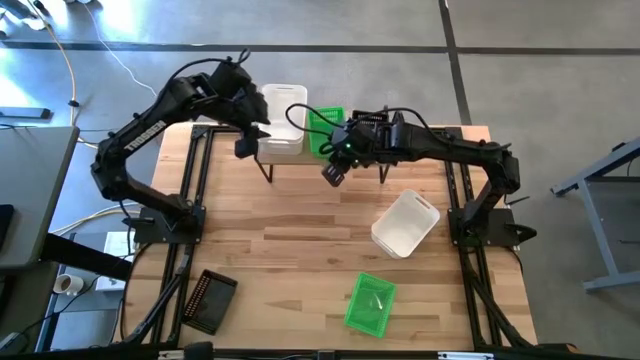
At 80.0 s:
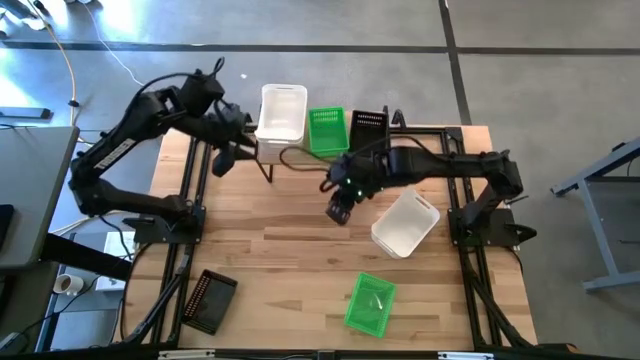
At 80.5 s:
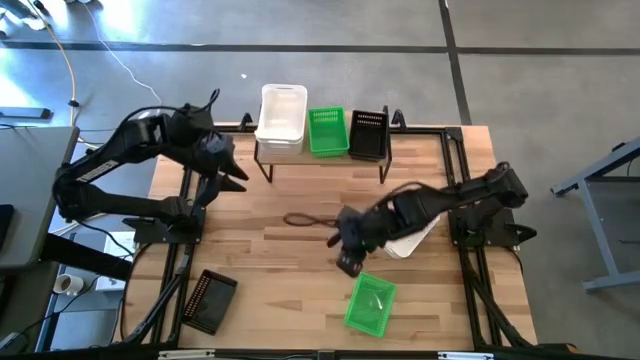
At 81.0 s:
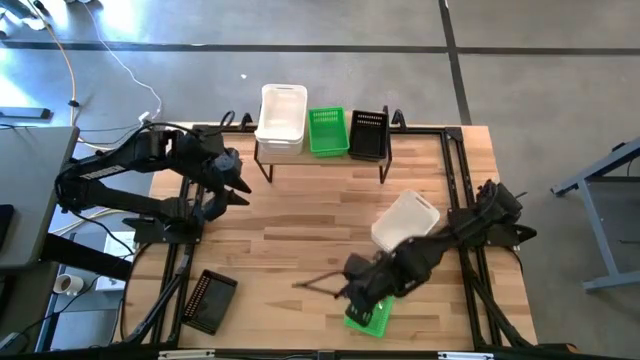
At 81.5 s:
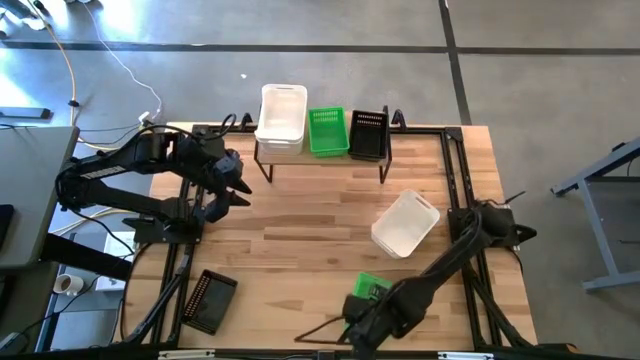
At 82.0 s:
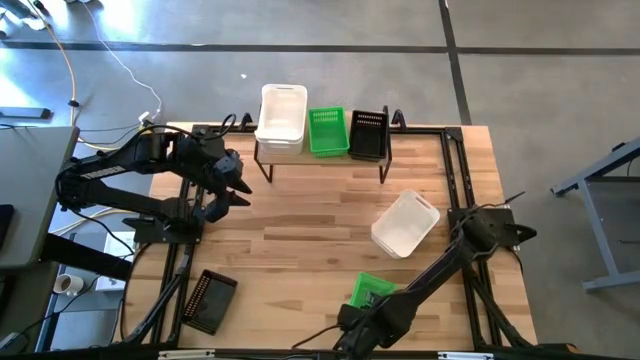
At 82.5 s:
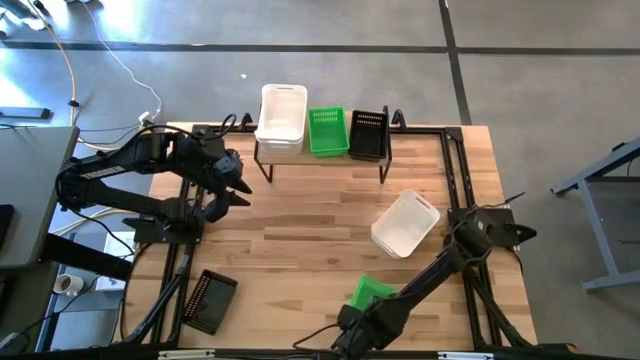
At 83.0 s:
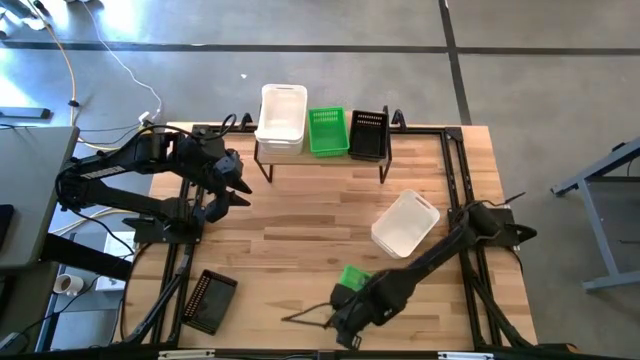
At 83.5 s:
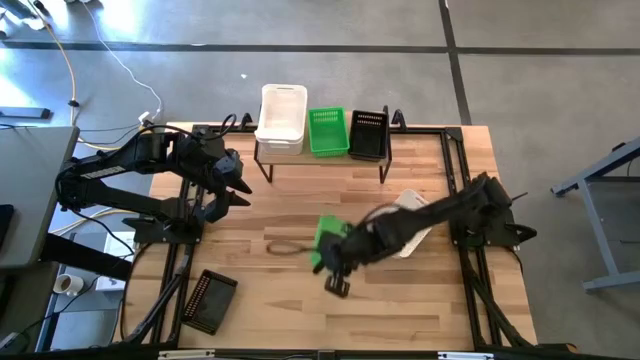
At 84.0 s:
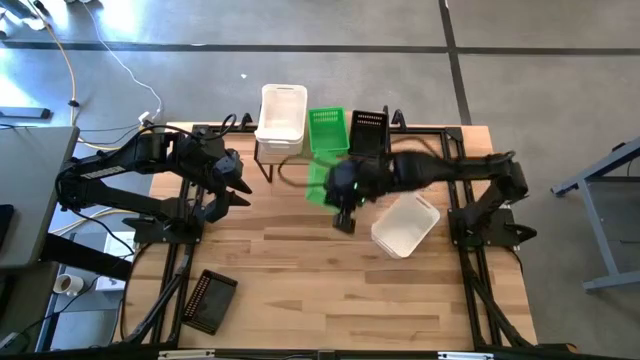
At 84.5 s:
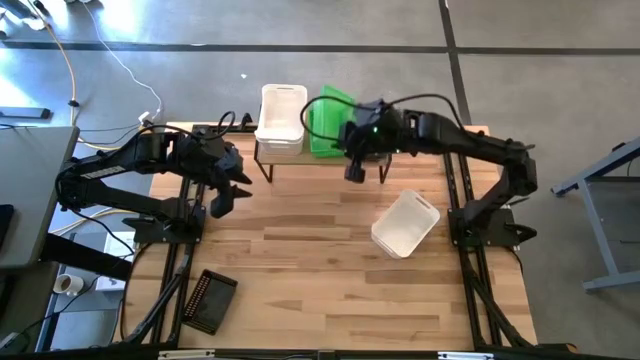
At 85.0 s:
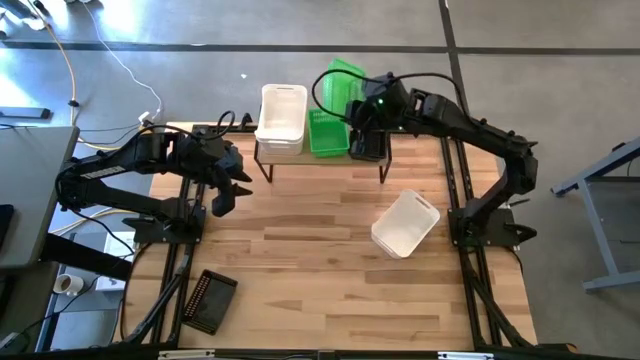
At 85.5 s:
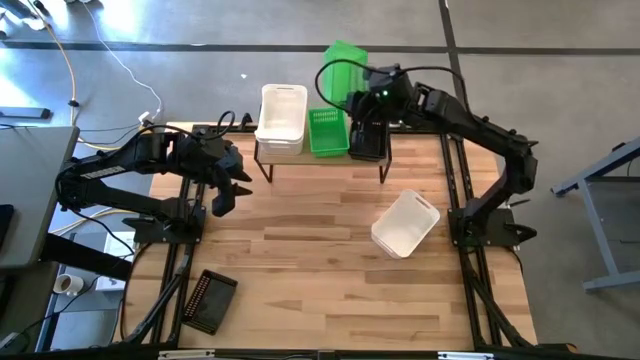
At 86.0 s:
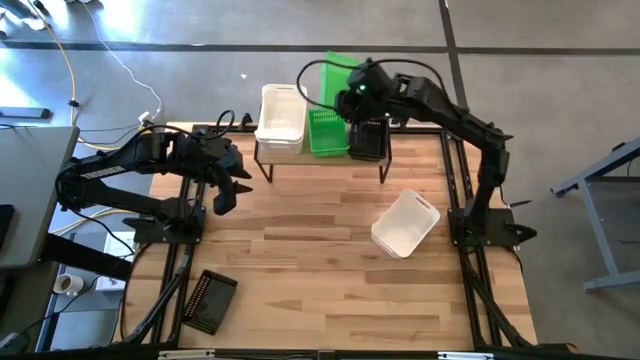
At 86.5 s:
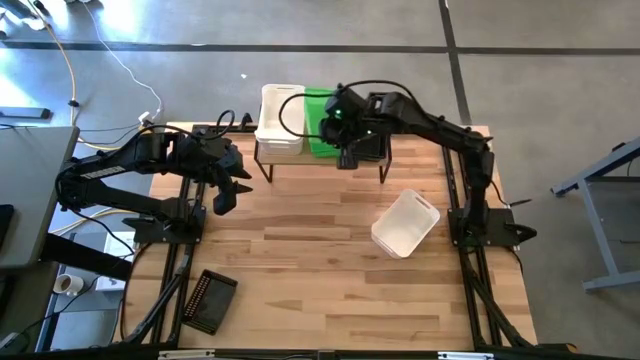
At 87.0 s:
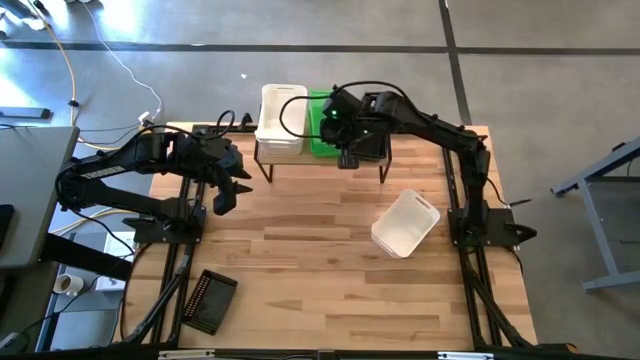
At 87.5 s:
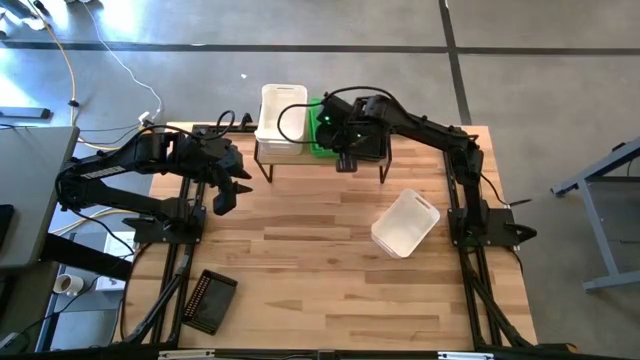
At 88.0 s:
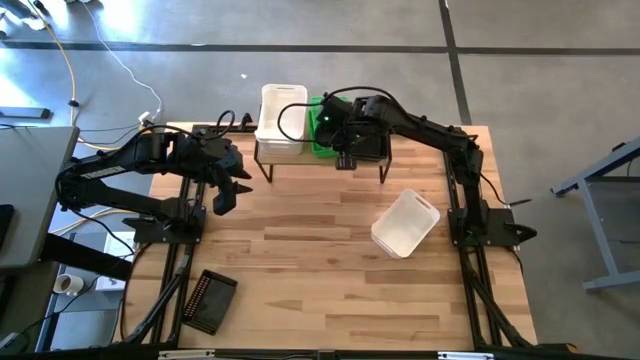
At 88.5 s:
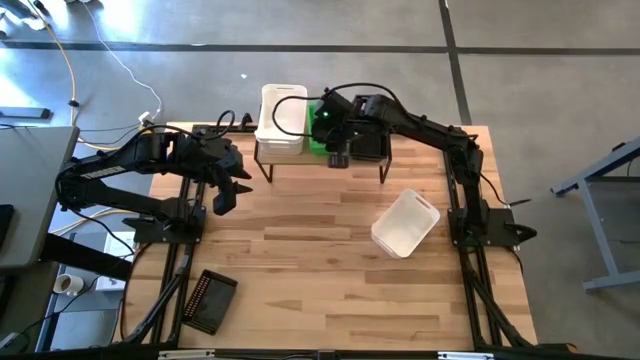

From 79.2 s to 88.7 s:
Task: Stack baskets on shelf by color
Stack the green bin on top of the green bin

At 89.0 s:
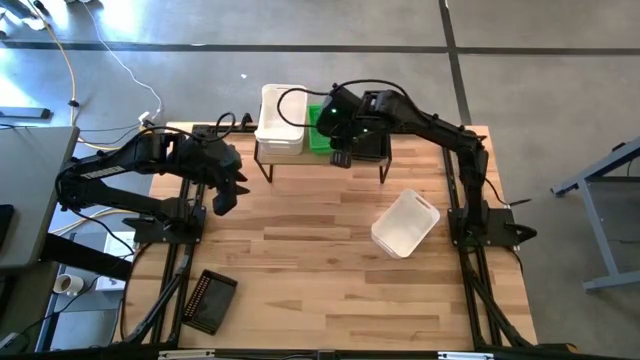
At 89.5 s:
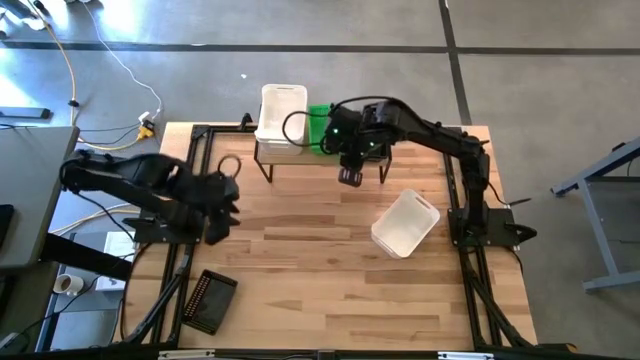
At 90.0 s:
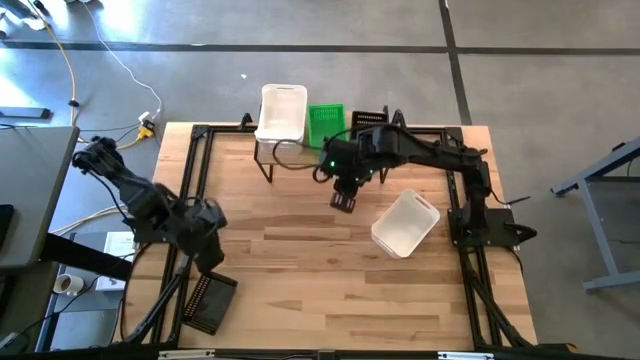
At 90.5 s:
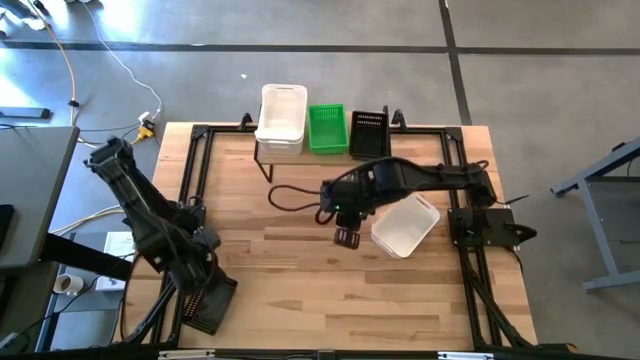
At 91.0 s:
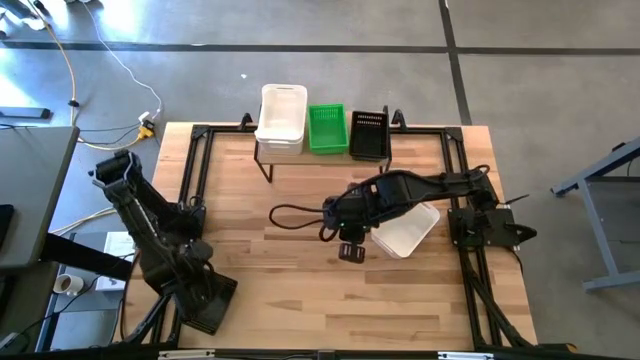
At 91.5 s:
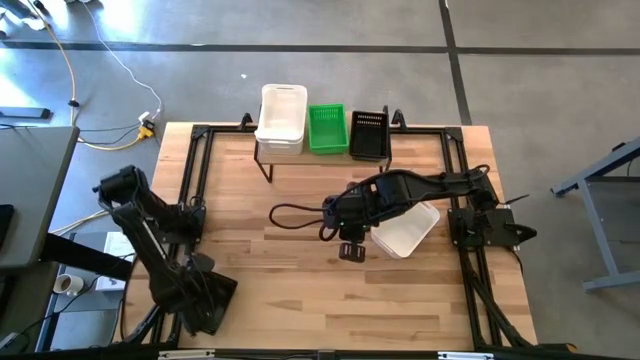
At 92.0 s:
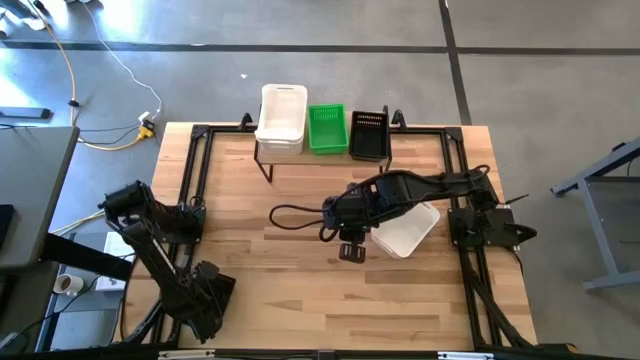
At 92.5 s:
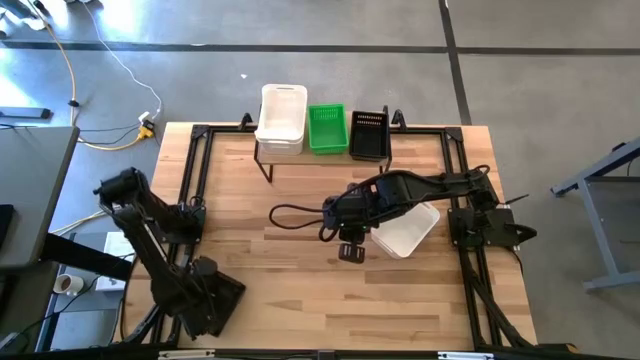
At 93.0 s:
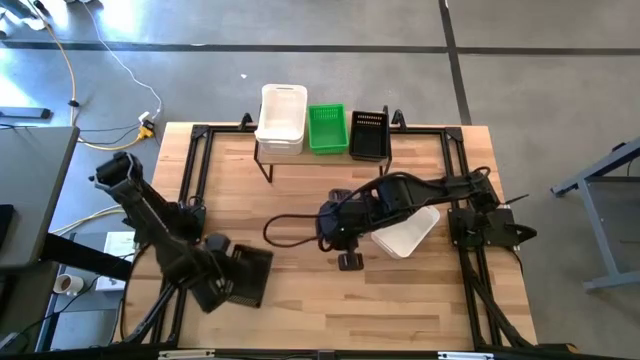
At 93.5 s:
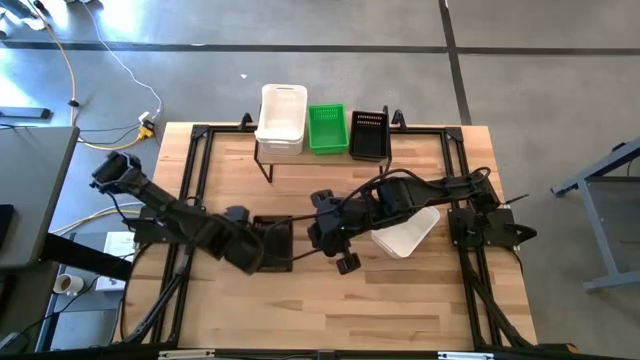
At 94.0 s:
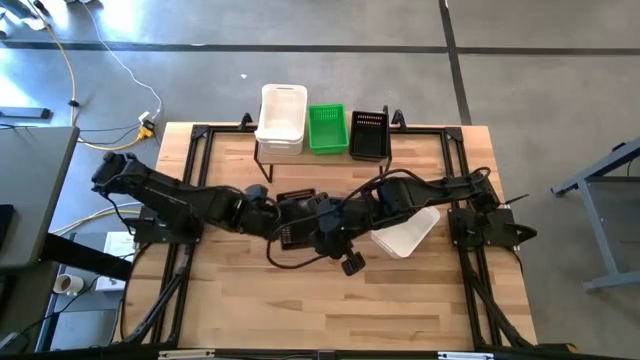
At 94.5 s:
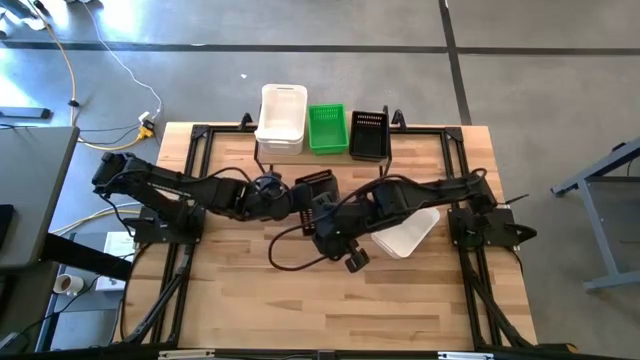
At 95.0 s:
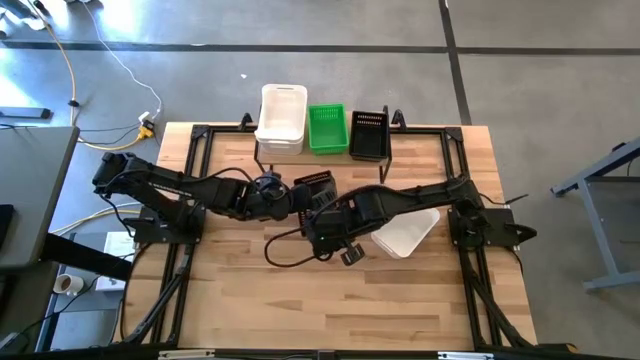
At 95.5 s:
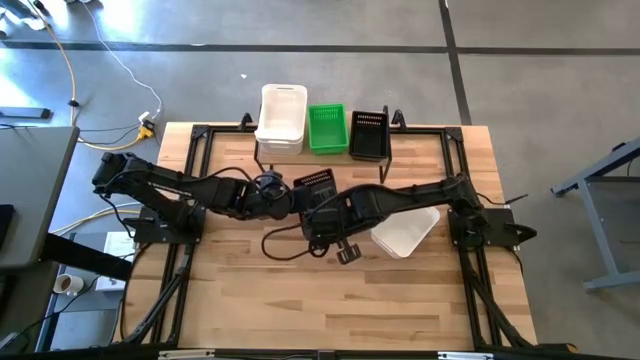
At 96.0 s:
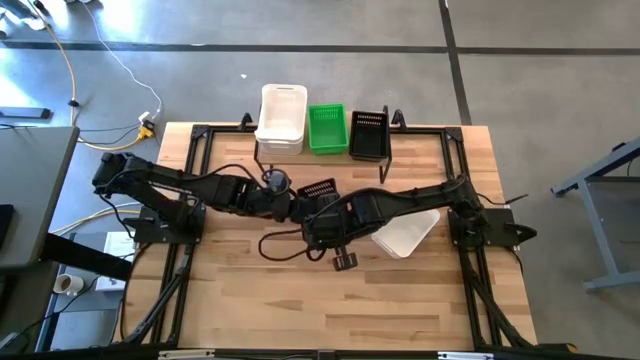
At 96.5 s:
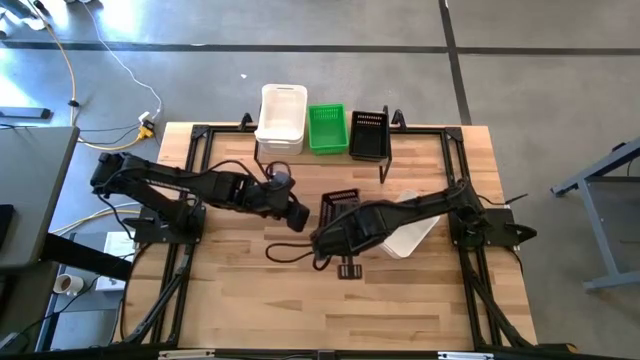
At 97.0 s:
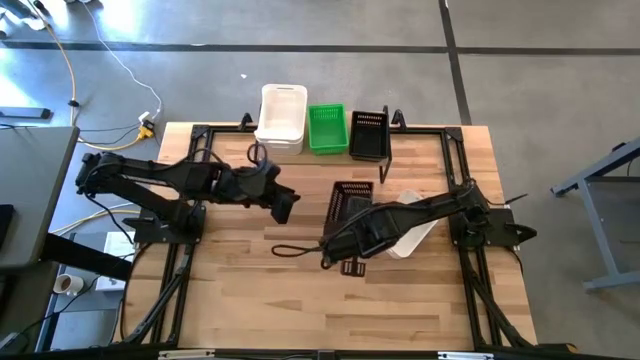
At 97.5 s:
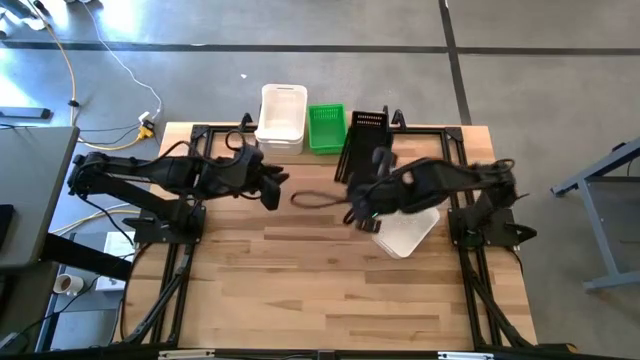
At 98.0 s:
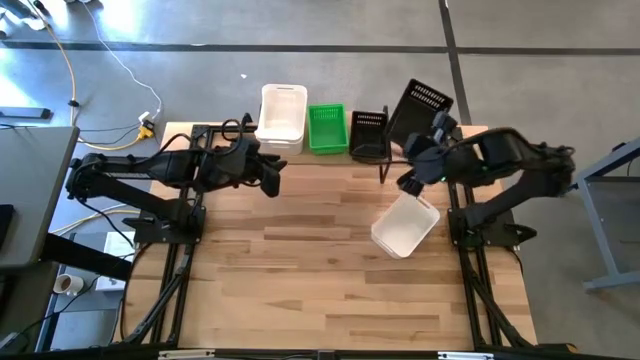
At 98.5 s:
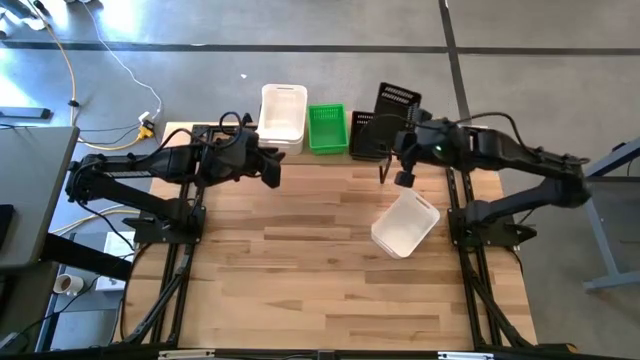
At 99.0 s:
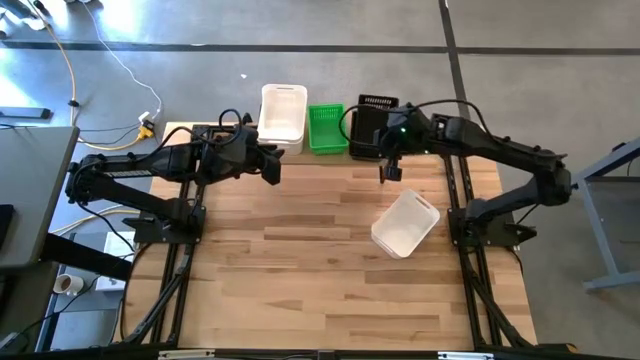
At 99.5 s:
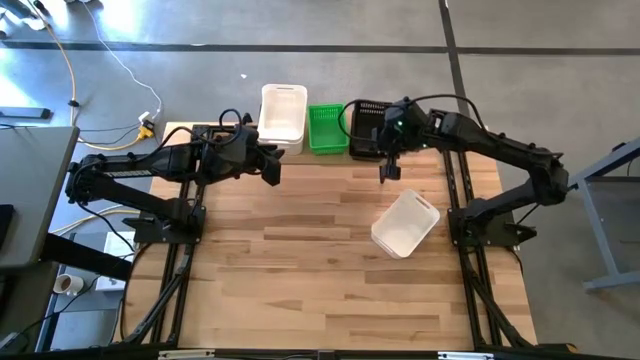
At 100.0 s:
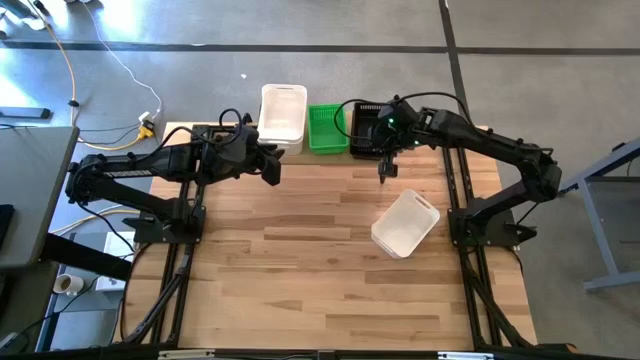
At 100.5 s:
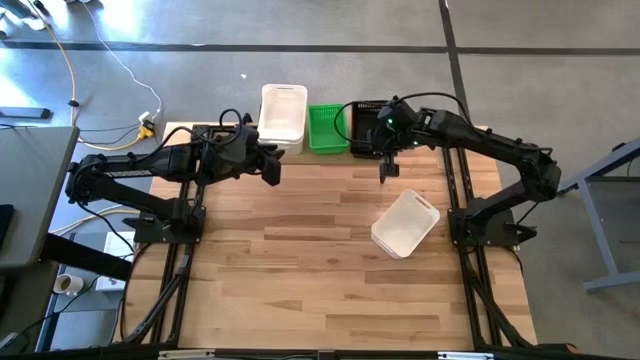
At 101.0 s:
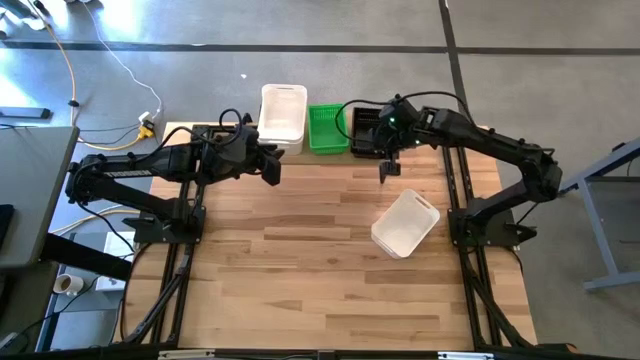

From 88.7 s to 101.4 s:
Stack the black bin on top of the black bin

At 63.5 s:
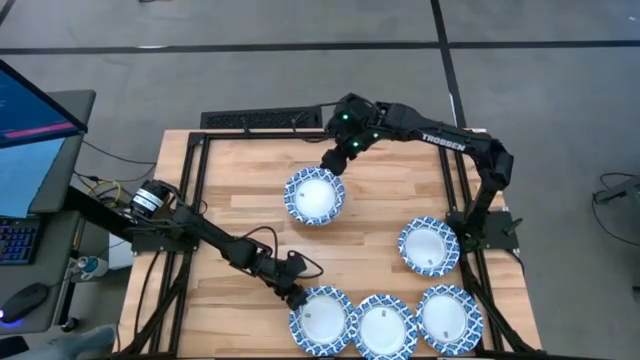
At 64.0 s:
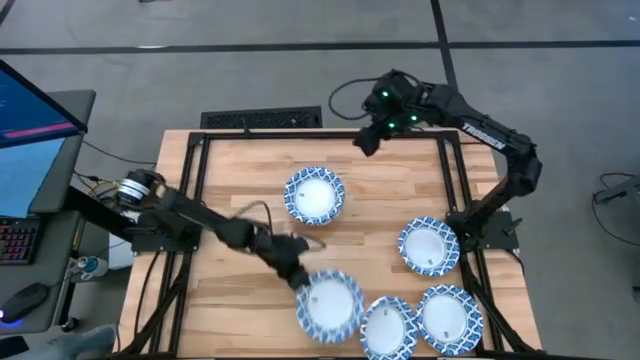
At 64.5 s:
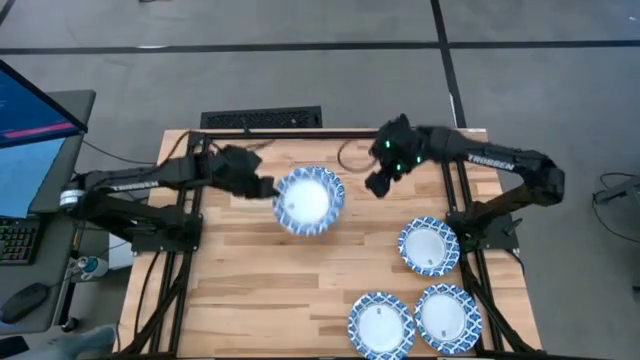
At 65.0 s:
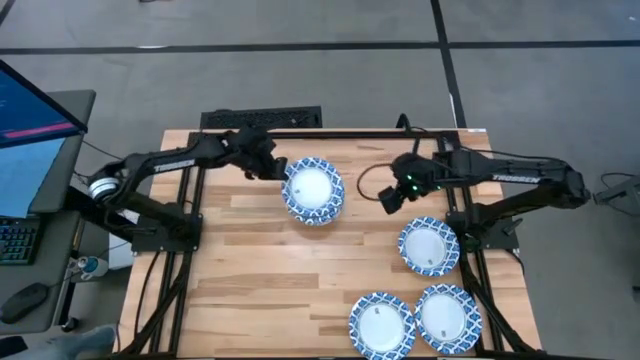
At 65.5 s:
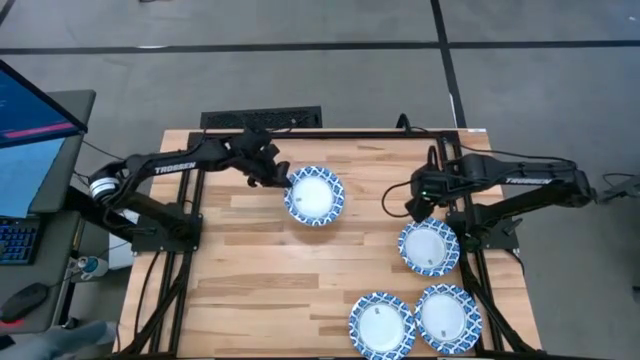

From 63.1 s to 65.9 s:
Task: Nest bowls inside each other
Stack the white bowl on the stacked white bowls
